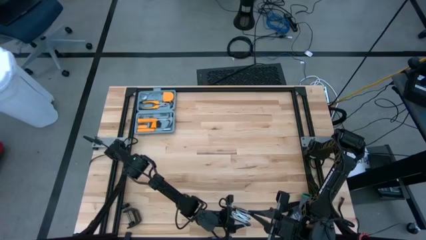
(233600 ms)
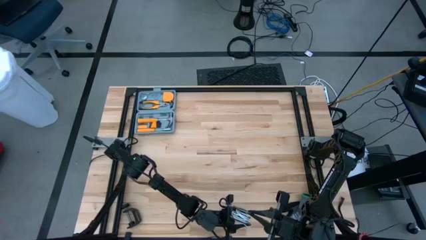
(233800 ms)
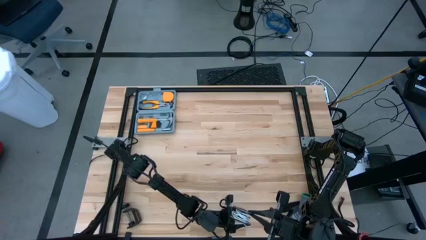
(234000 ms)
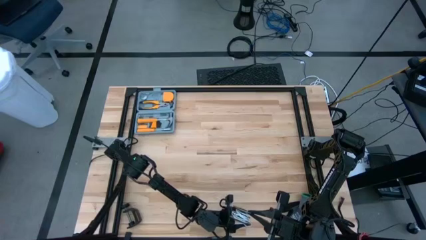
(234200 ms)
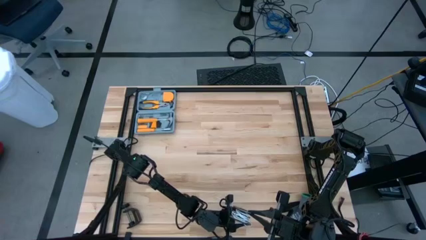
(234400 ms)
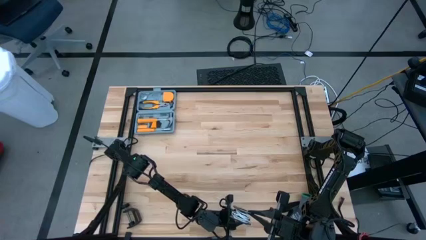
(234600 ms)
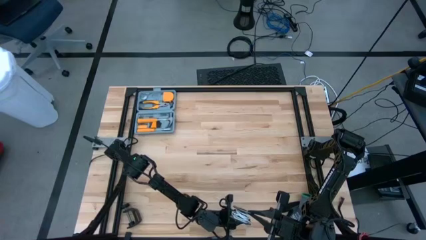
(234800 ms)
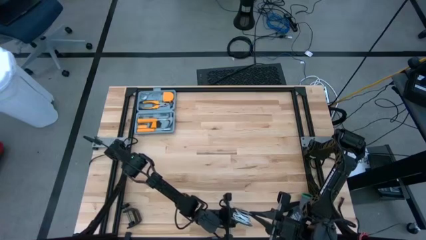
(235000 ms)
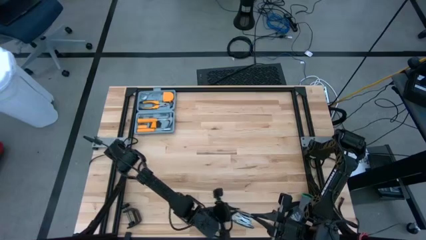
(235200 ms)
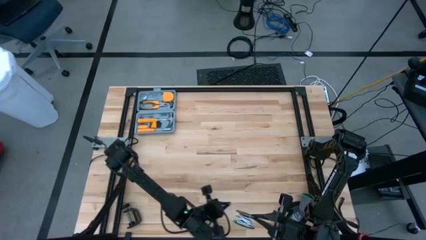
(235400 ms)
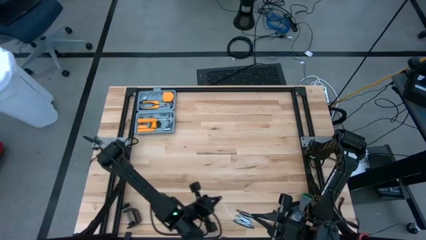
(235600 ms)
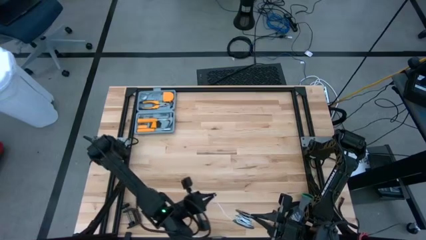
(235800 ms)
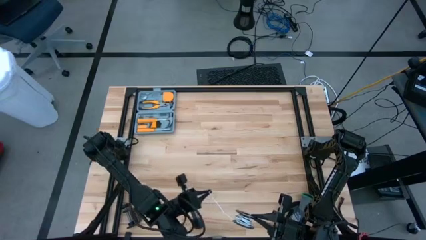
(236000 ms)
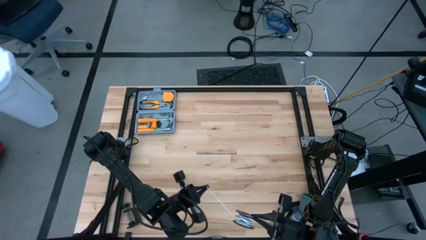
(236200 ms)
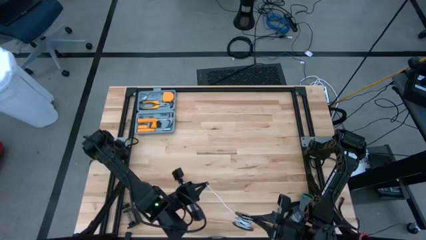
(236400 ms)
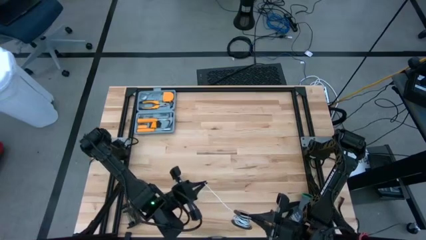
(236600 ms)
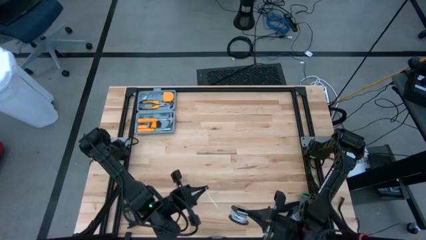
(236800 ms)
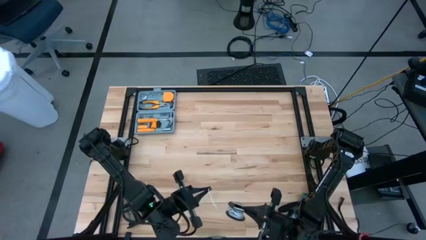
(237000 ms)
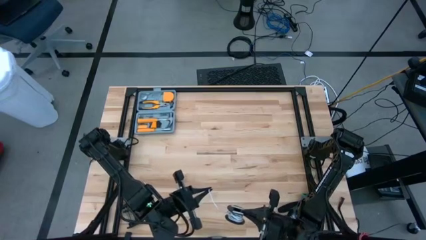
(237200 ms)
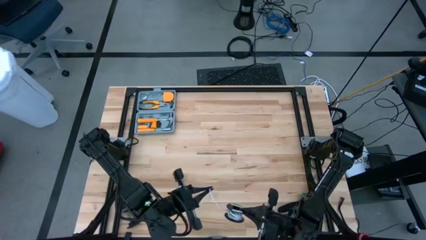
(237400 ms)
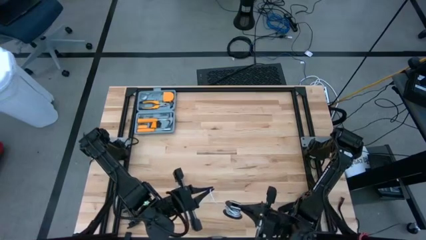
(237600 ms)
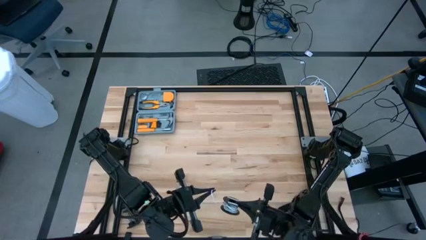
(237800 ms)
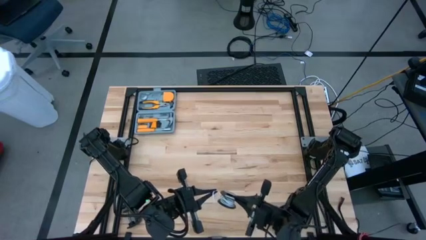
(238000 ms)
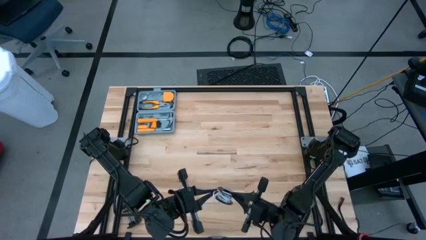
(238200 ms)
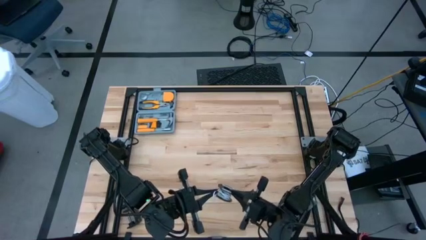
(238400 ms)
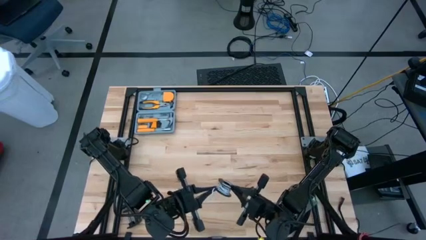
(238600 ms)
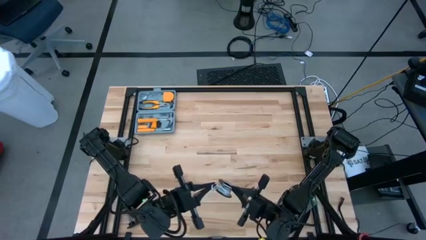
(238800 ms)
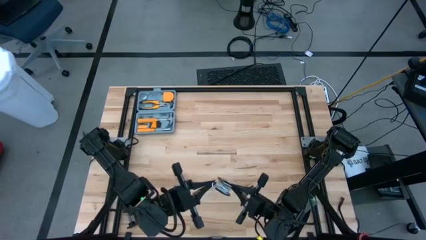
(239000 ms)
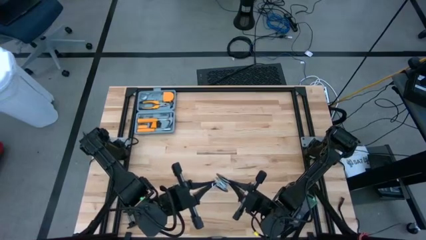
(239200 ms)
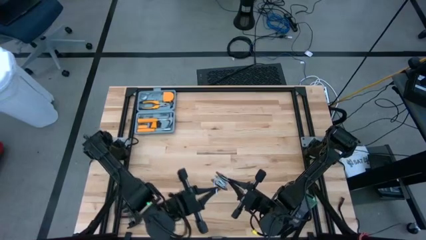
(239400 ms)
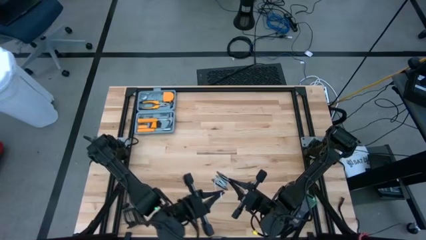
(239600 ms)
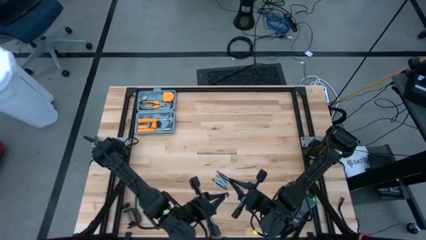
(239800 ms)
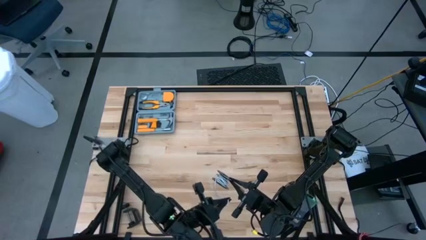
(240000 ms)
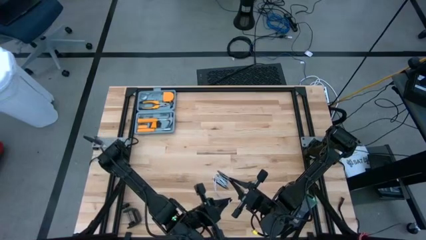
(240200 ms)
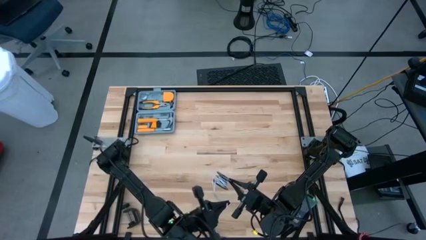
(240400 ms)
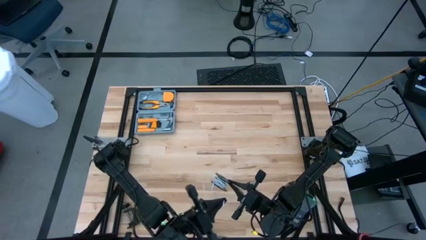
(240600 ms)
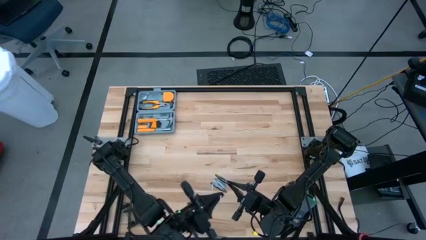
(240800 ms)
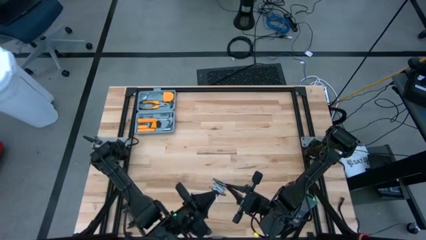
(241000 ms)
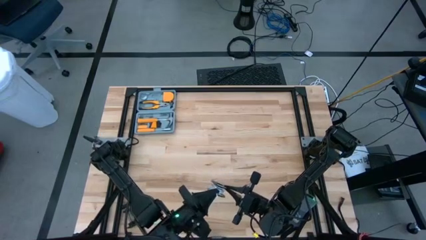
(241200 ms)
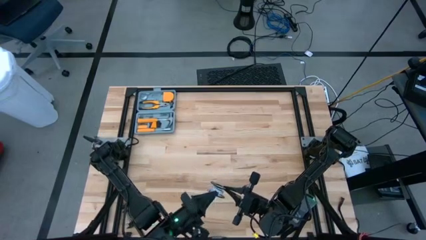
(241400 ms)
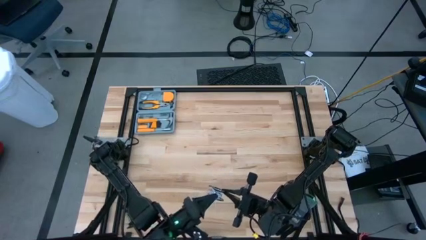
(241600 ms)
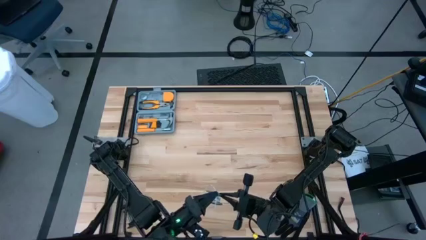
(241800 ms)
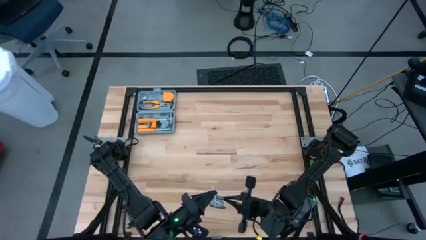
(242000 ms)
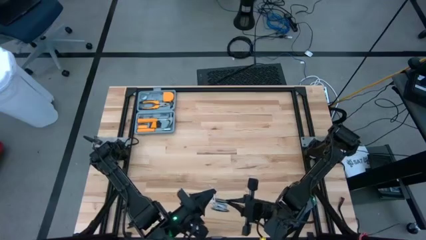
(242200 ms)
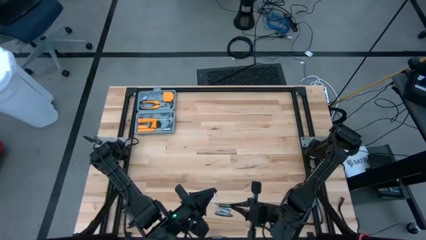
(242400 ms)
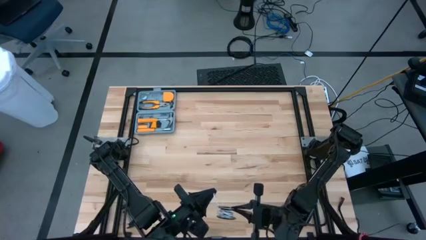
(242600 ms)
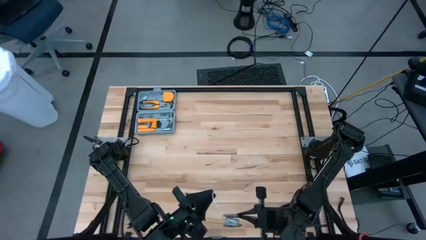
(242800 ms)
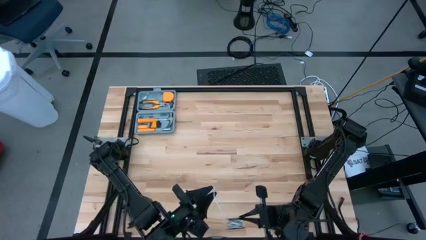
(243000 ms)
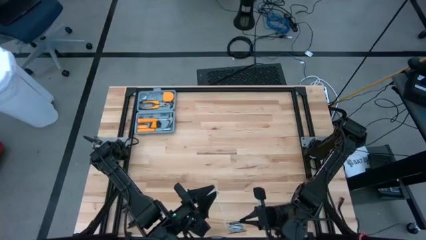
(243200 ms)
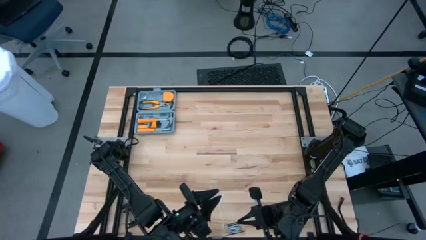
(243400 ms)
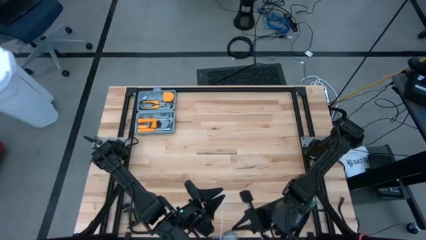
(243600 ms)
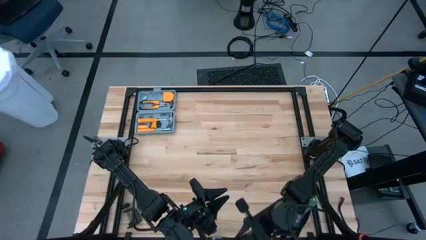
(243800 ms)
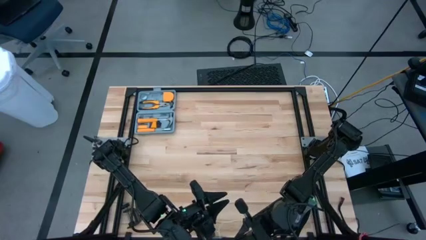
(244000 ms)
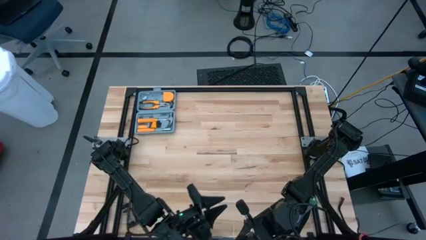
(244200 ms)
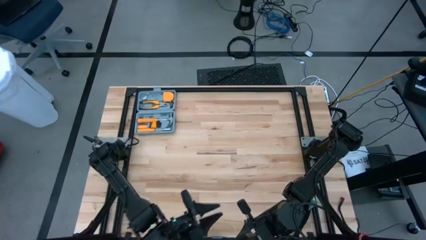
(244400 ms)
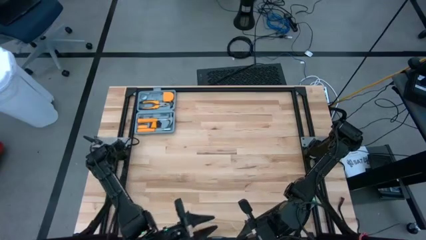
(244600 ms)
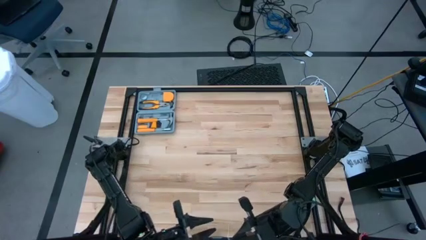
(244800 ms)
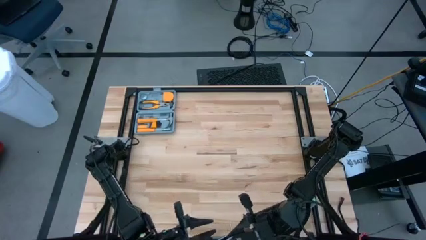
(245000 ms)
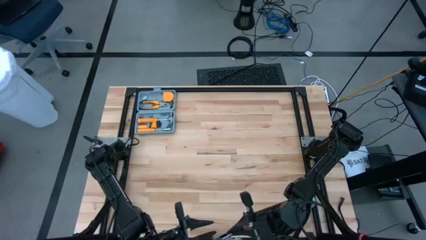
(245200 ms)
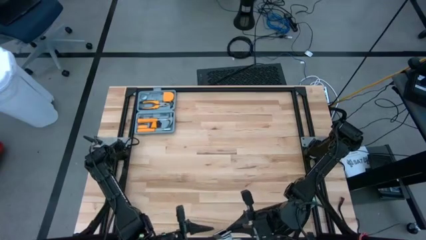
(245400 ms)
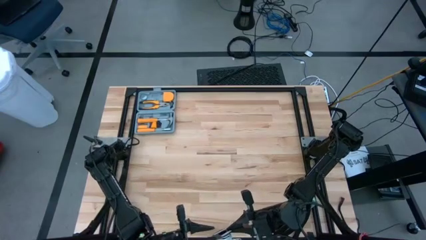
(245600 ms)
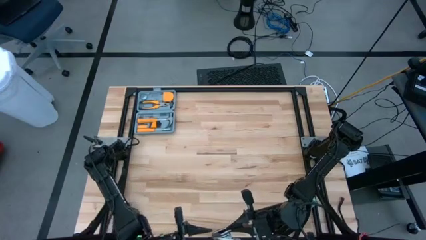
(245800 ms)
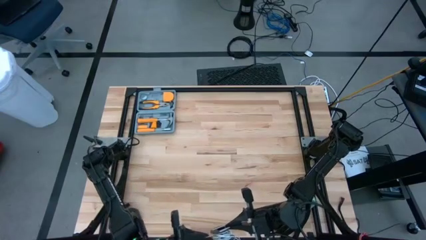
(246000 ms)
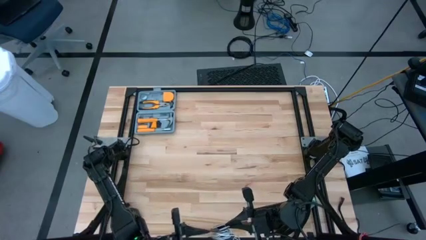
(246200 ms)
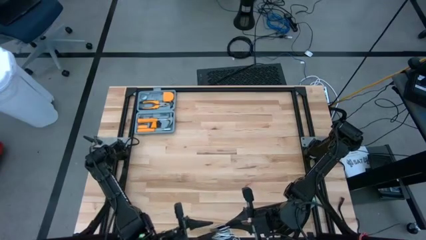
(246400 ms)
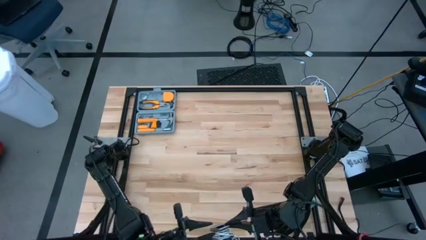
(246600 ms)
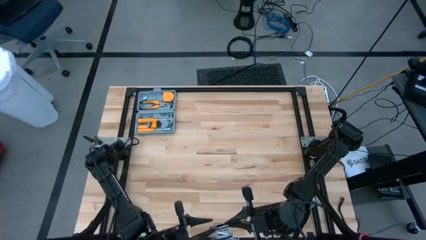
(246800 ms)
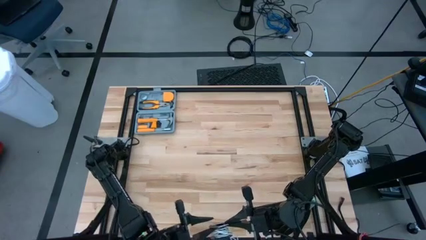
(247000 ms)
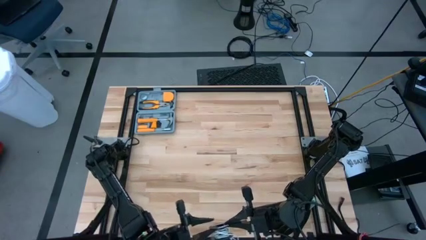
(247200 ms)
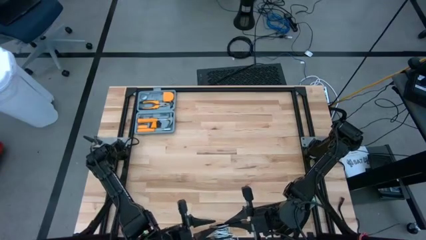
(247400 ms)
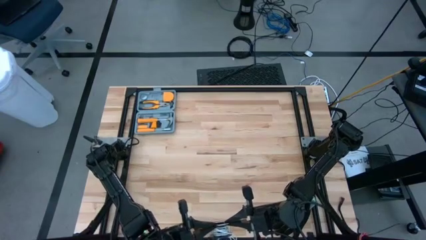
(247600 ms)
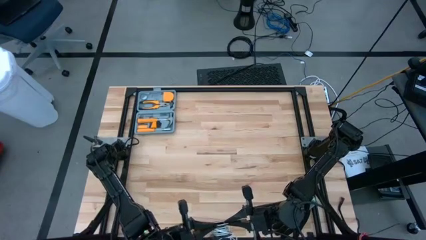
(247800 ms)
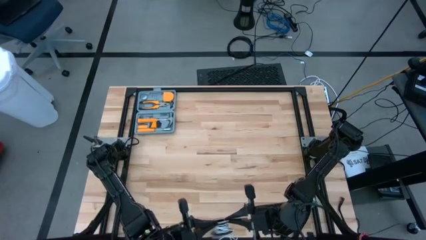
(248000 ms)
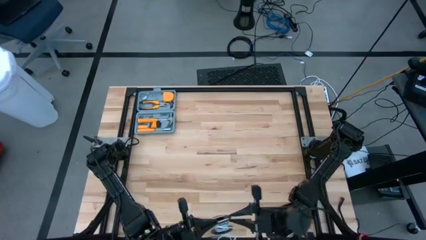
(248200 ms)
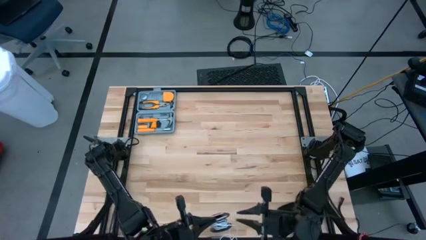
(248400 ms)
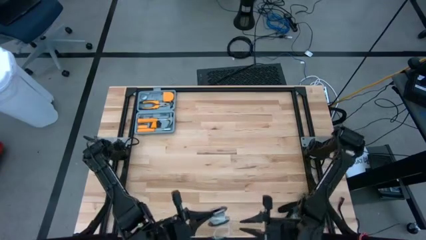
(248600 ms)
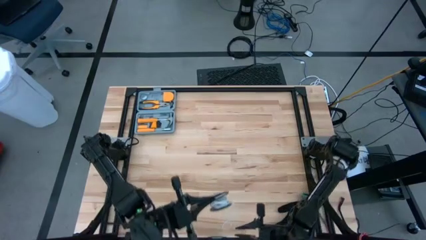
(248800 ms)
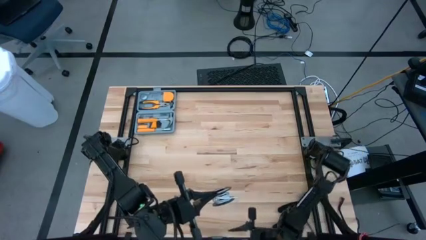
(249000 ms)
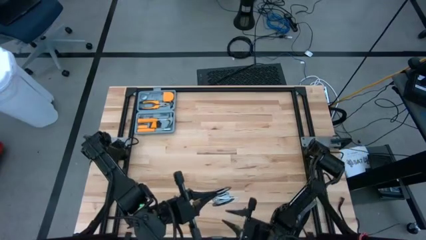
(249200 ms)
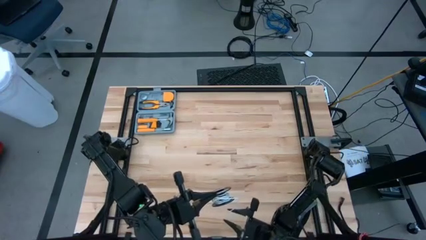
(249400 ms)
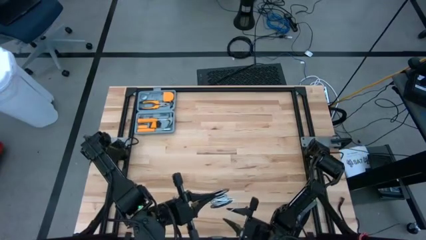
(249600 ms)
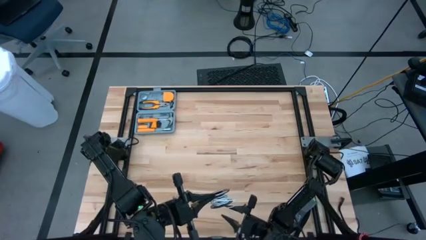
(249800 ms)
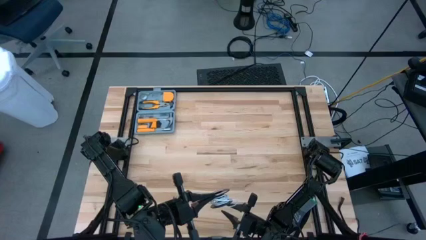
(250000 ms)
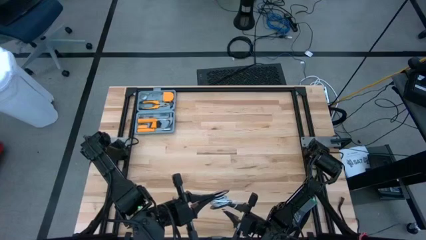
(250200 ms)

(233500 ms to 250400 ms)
Task: Coil cords
Coil the white wire on the spool
